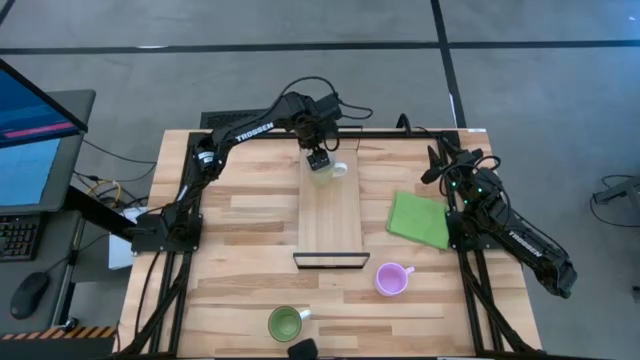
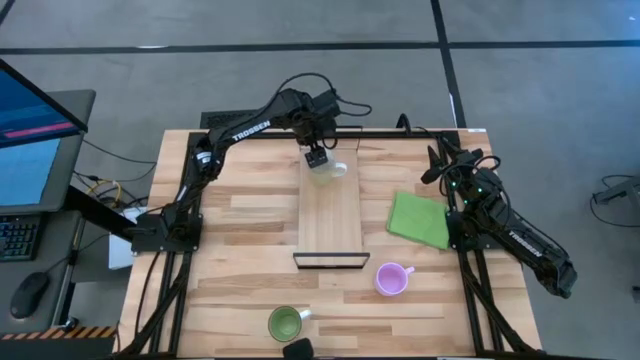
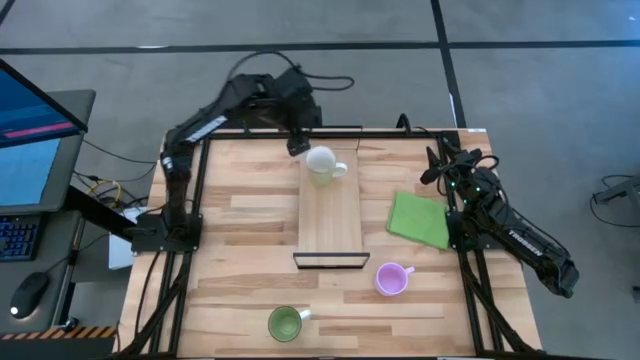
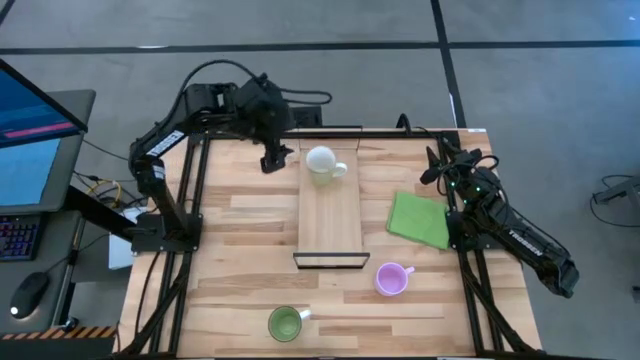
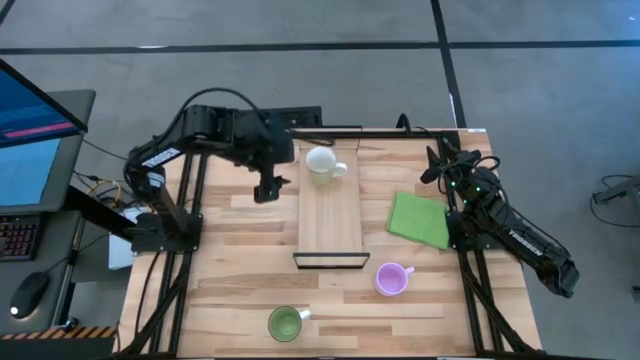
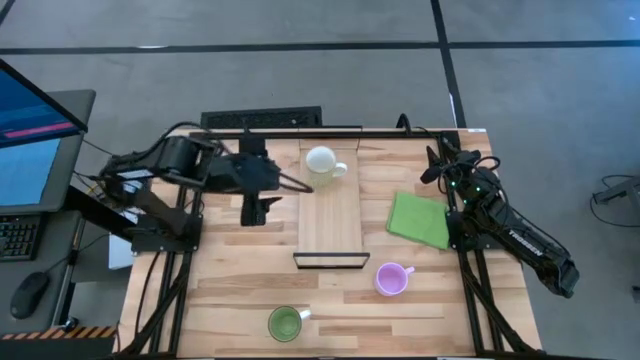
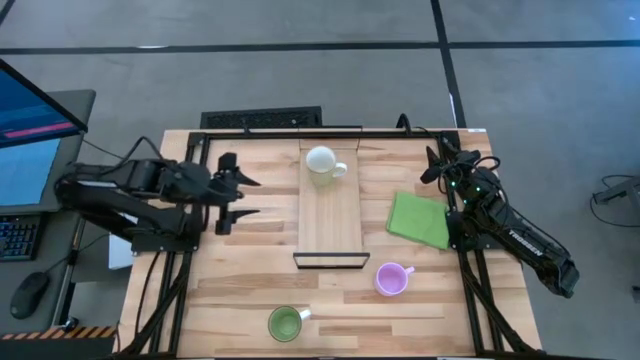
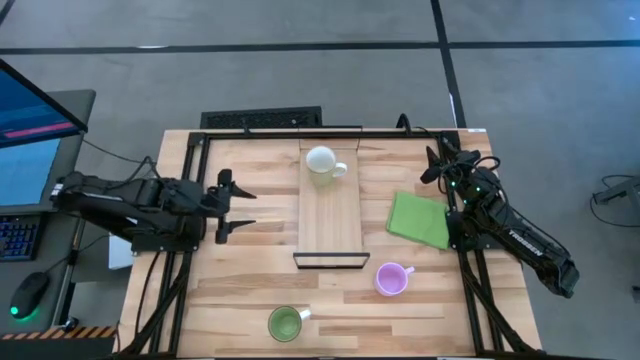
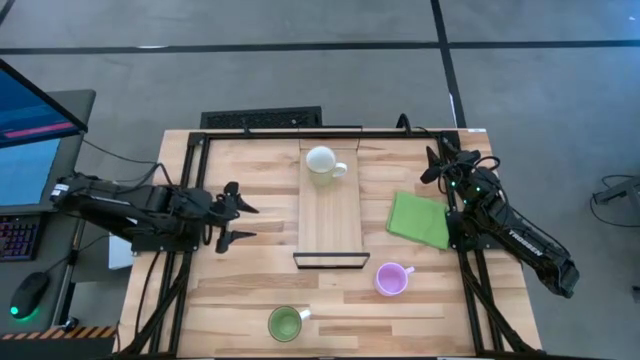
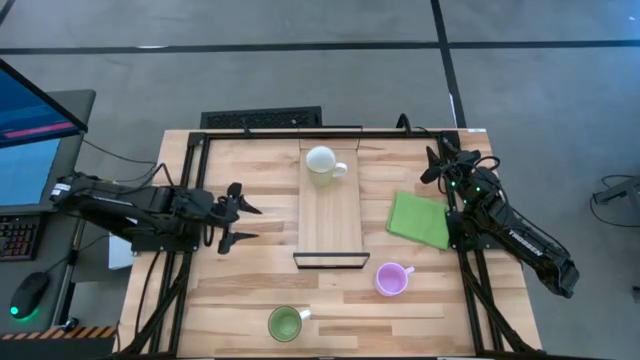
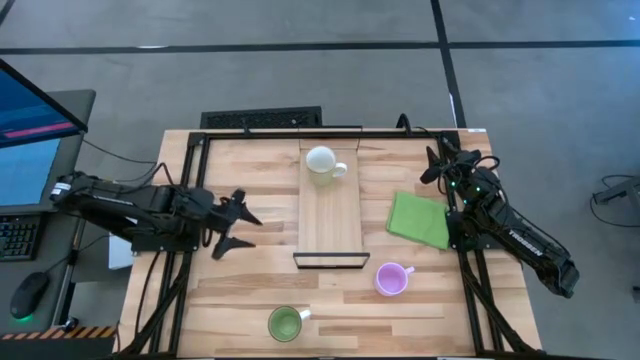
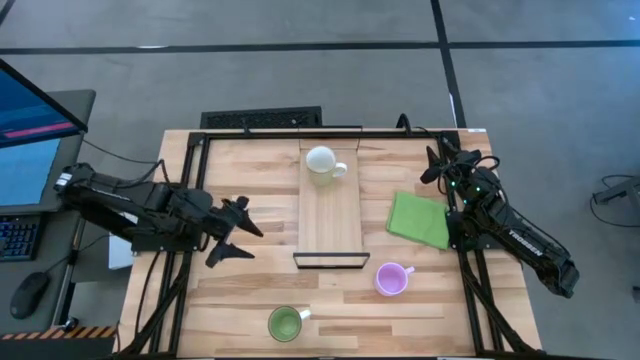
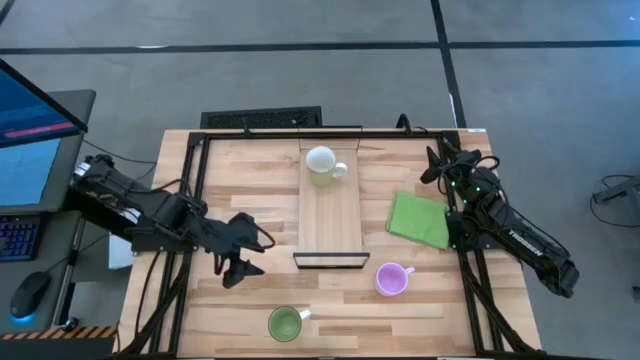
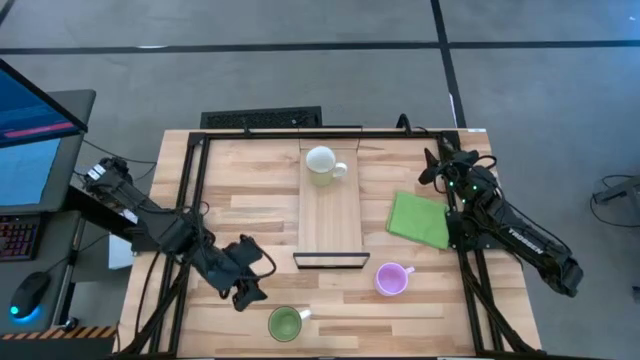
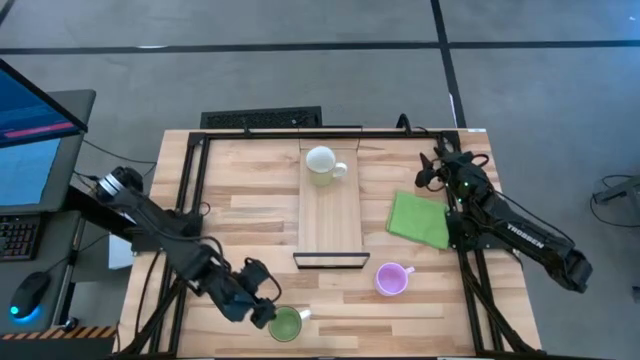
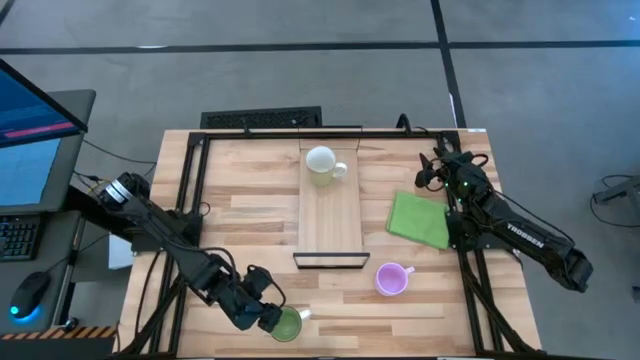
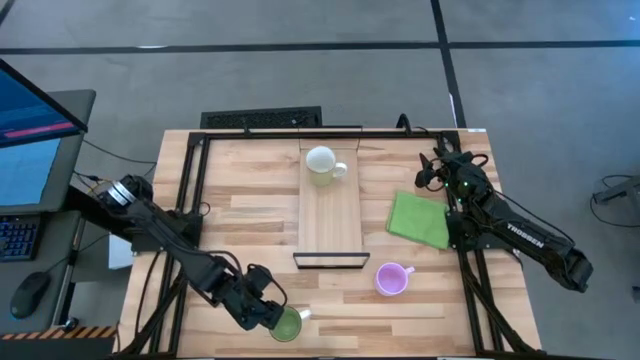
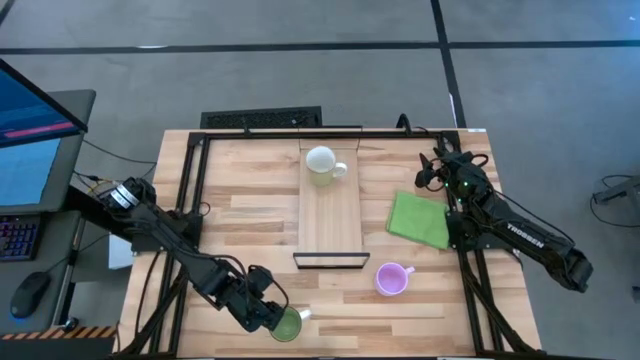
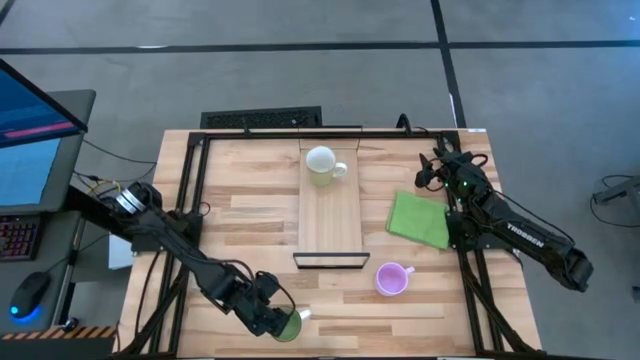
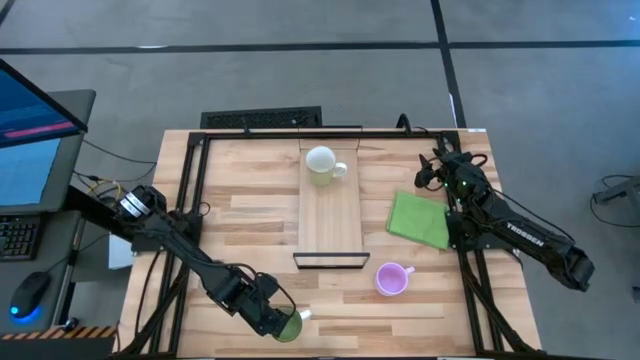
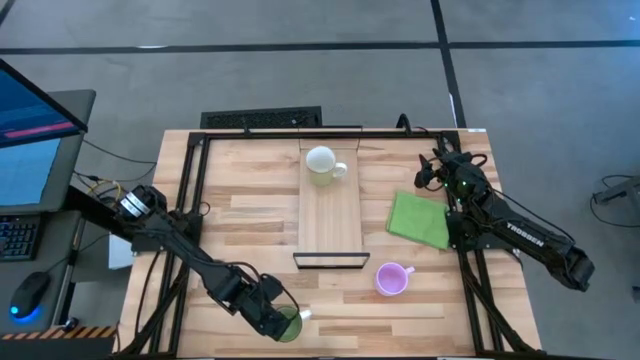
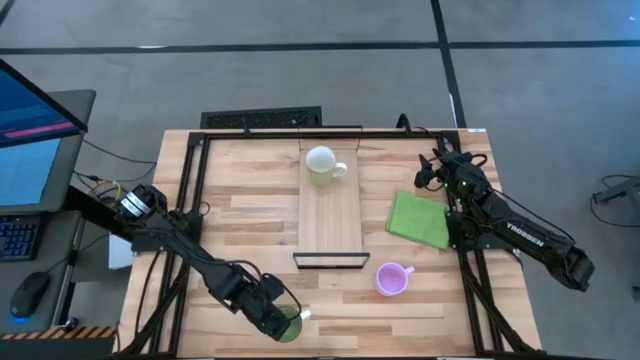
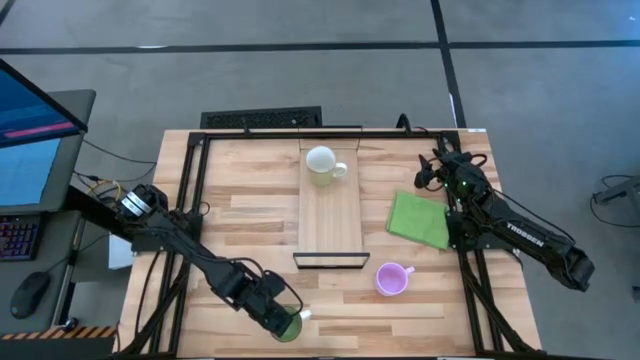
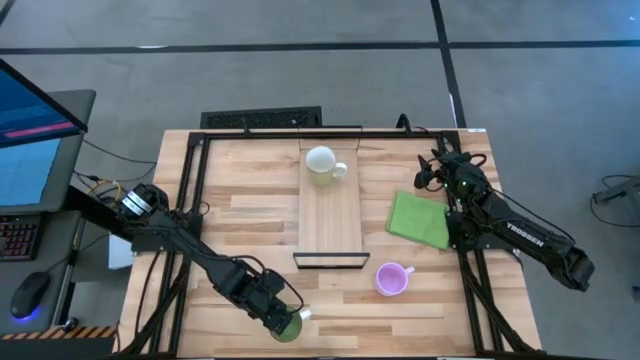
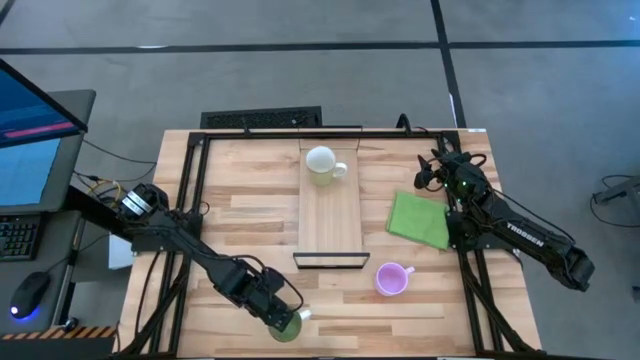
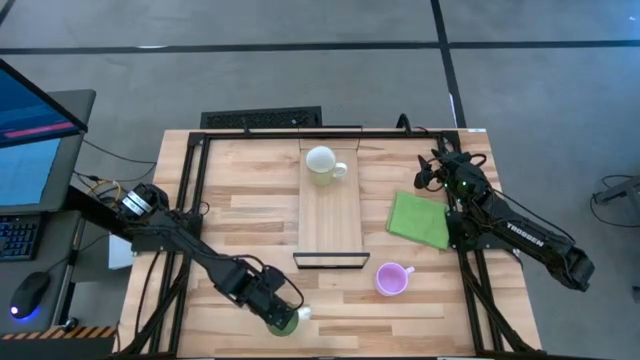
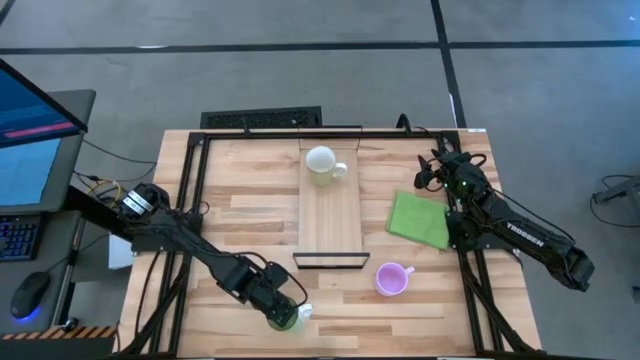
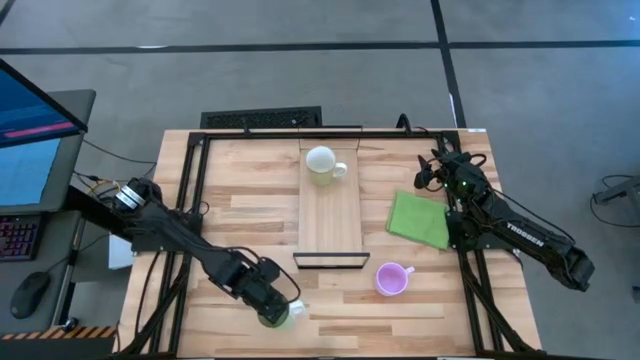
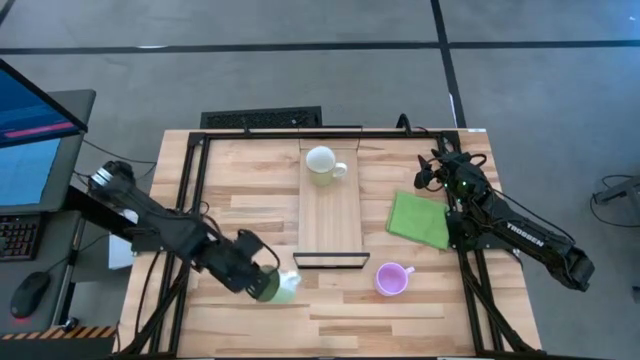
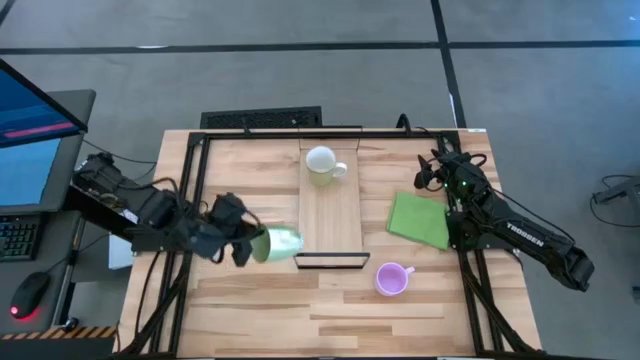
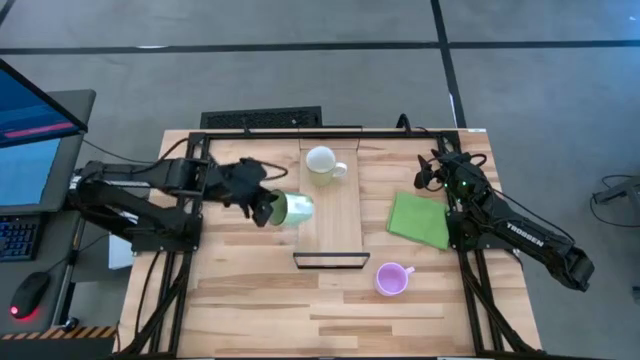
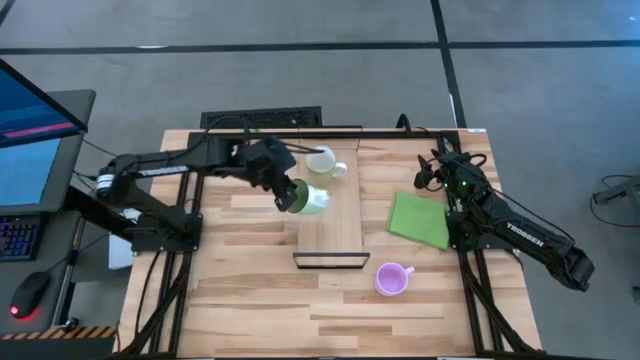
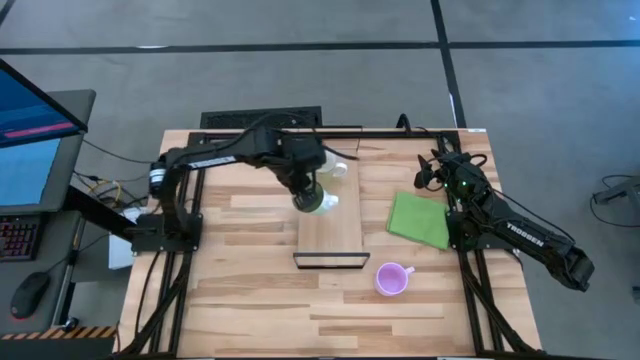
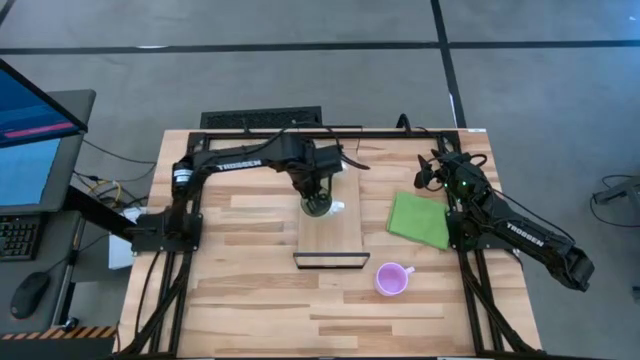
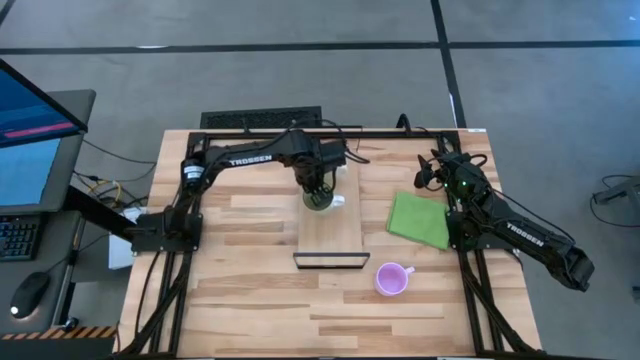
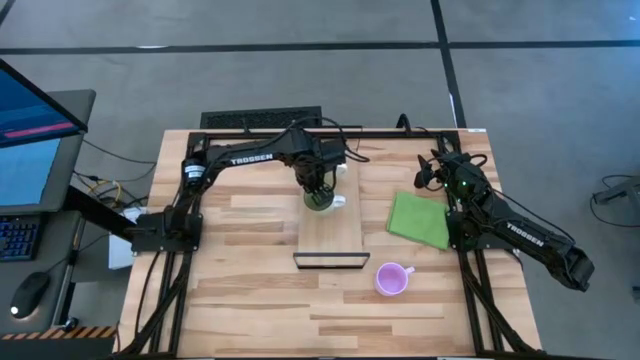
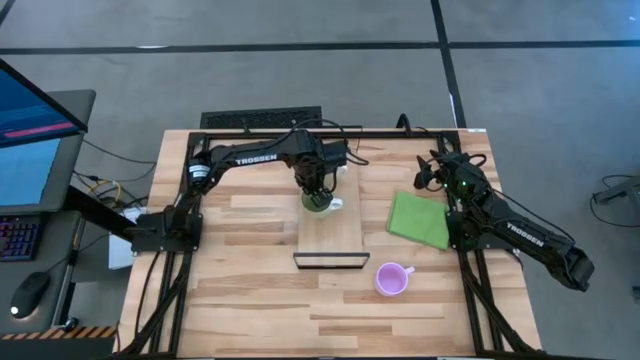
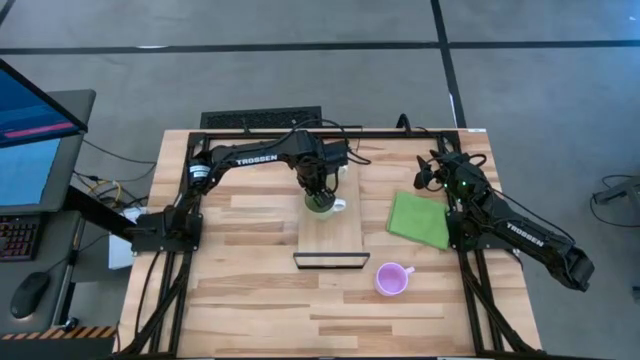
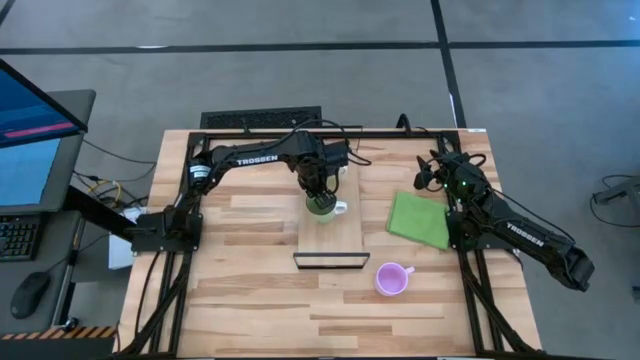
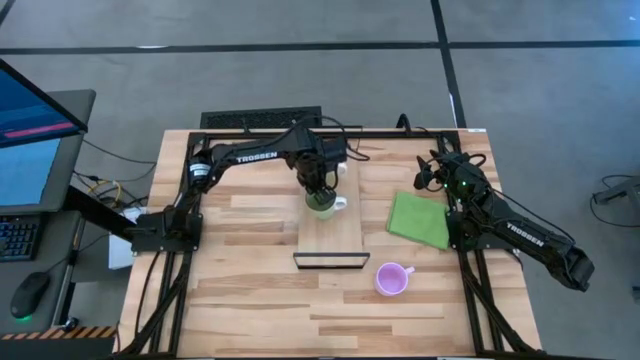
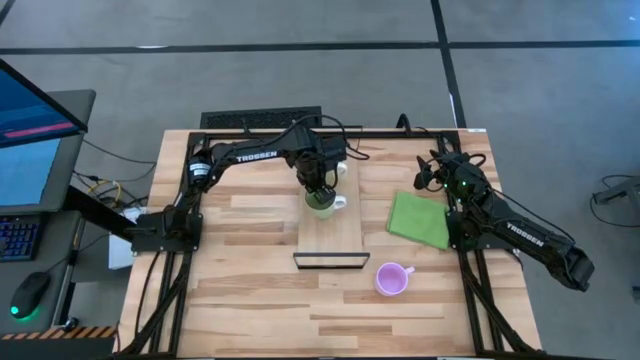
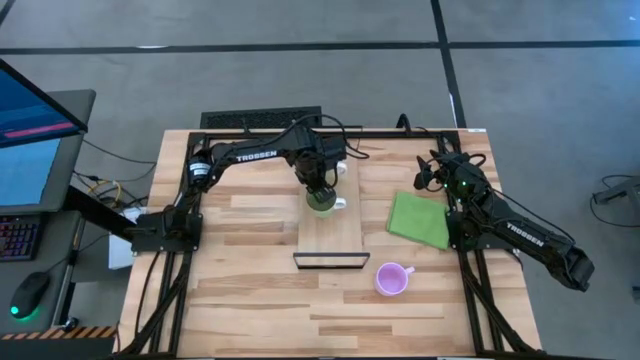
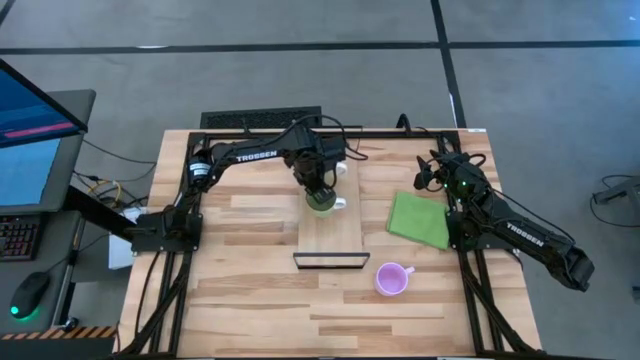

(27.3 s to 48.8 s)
Task: Stack small to large cups/mugs on shelf
Put the green mug on the shelf
